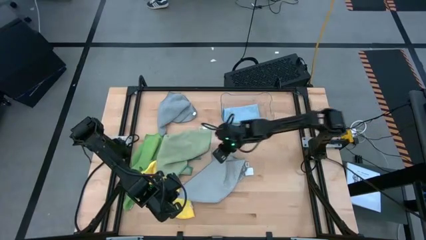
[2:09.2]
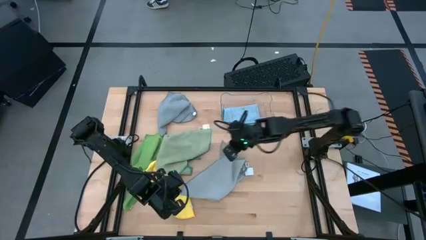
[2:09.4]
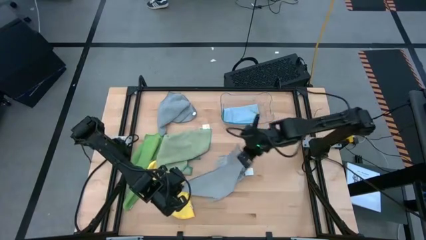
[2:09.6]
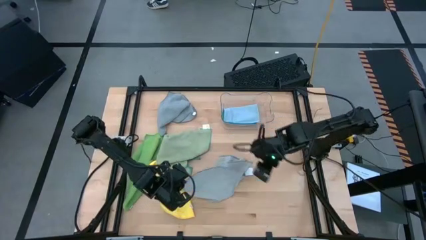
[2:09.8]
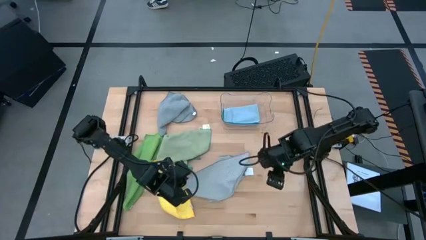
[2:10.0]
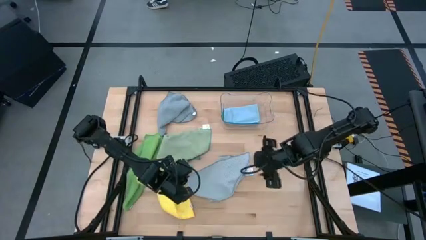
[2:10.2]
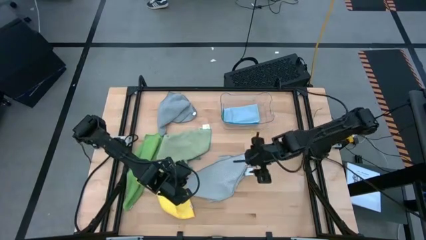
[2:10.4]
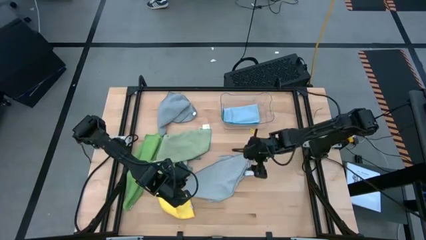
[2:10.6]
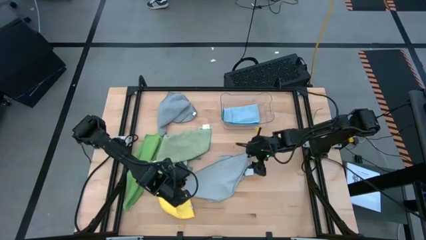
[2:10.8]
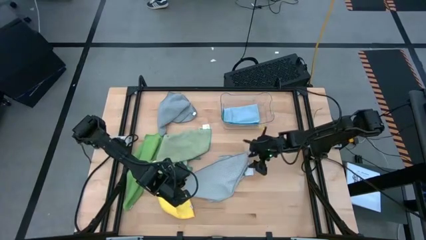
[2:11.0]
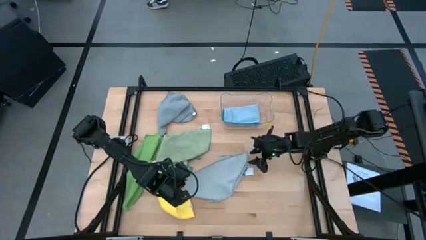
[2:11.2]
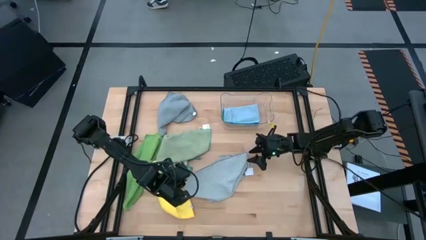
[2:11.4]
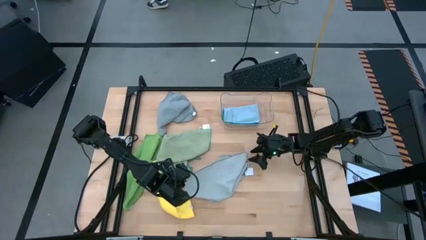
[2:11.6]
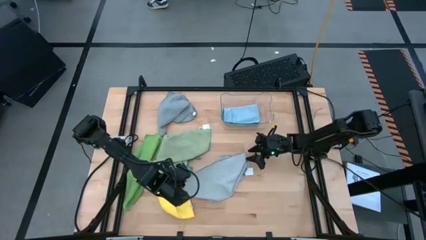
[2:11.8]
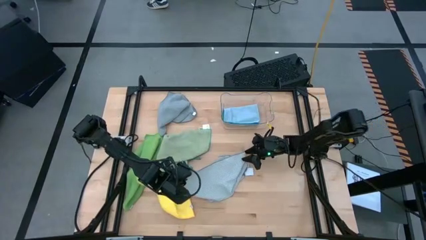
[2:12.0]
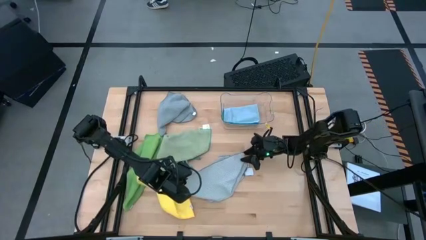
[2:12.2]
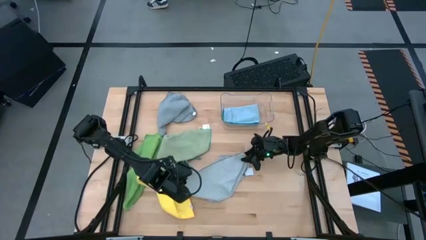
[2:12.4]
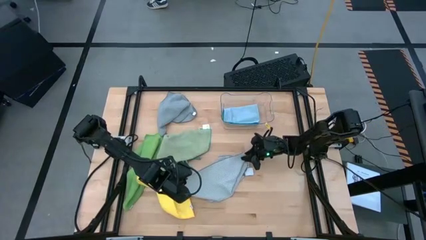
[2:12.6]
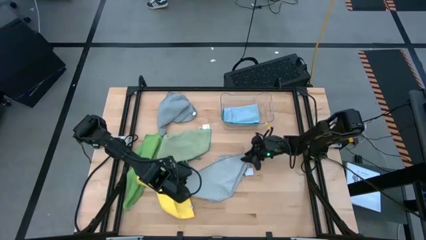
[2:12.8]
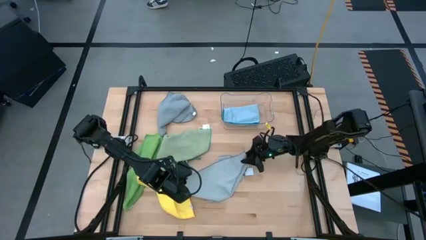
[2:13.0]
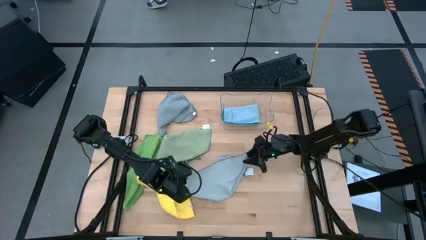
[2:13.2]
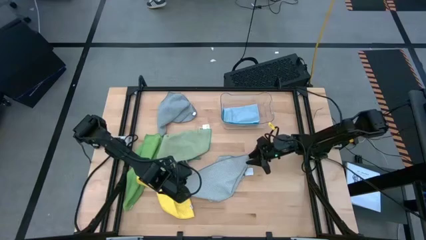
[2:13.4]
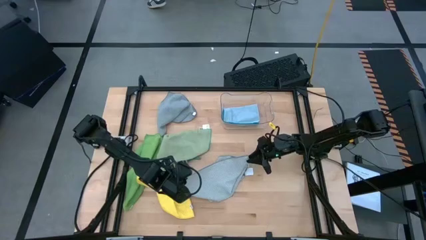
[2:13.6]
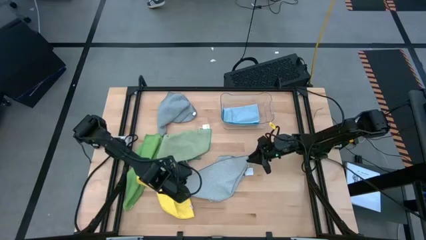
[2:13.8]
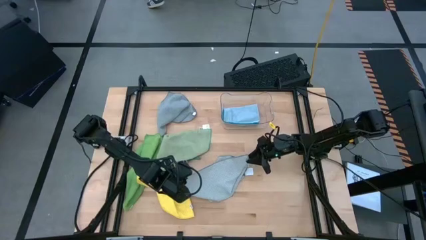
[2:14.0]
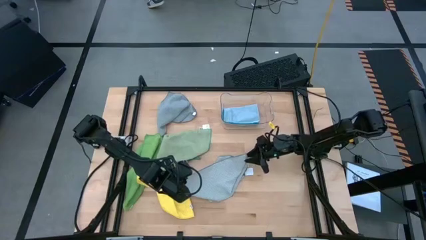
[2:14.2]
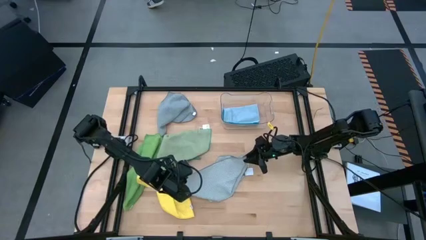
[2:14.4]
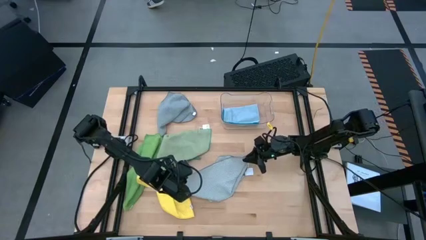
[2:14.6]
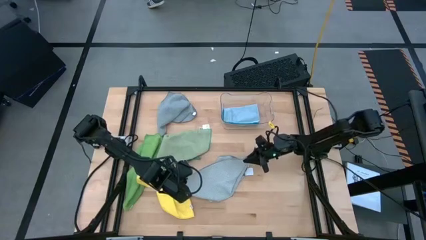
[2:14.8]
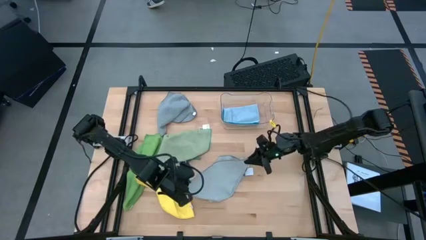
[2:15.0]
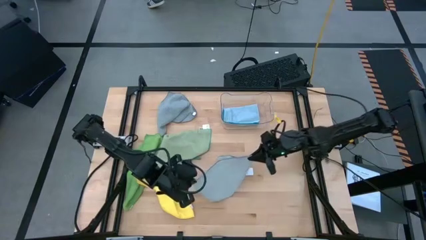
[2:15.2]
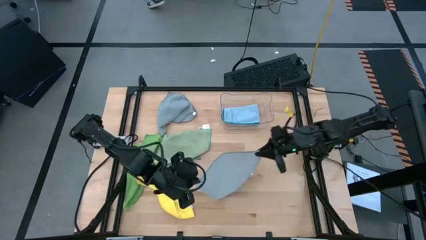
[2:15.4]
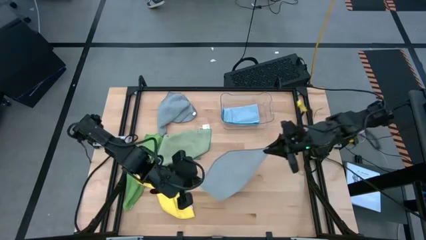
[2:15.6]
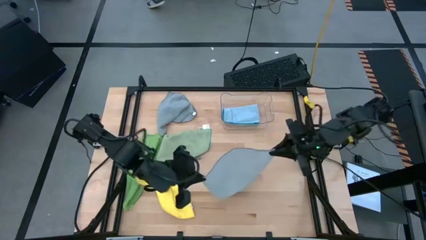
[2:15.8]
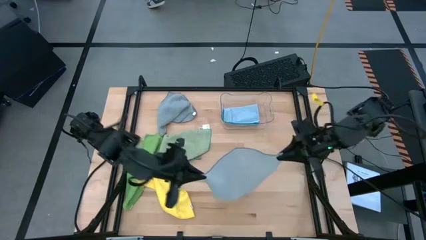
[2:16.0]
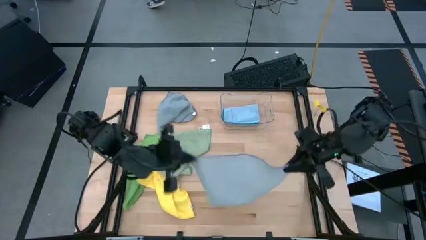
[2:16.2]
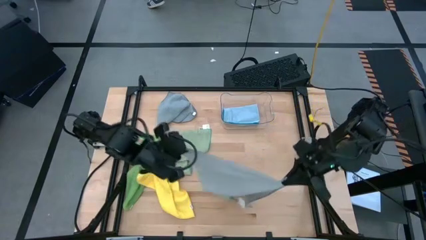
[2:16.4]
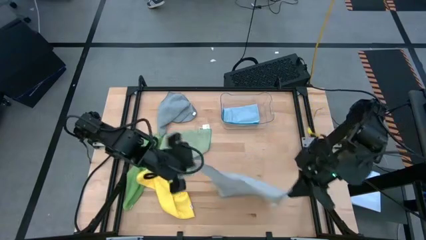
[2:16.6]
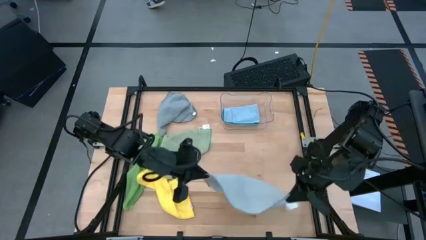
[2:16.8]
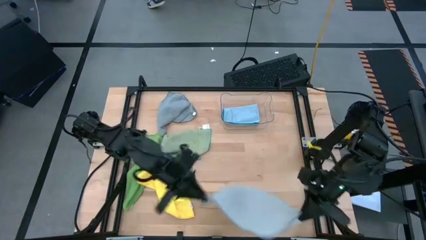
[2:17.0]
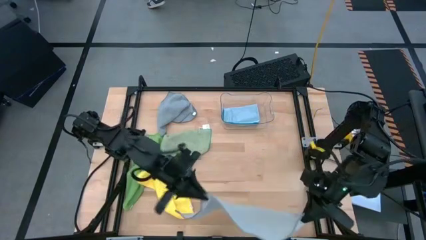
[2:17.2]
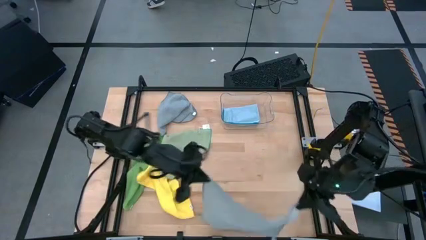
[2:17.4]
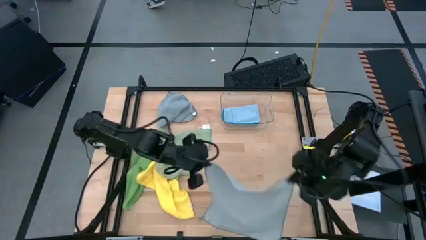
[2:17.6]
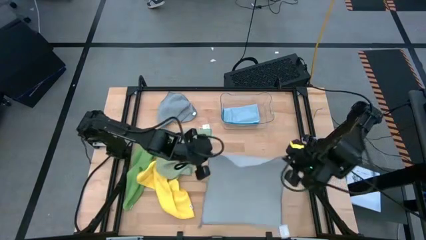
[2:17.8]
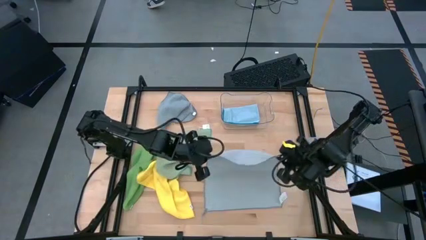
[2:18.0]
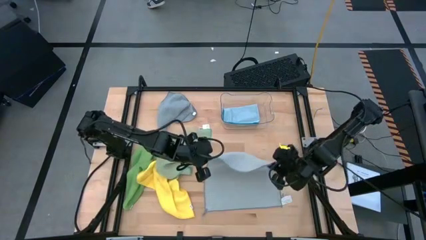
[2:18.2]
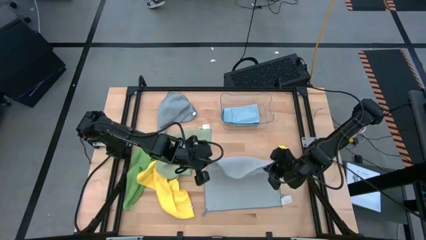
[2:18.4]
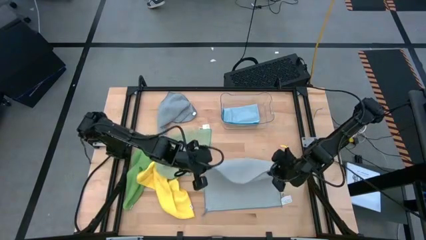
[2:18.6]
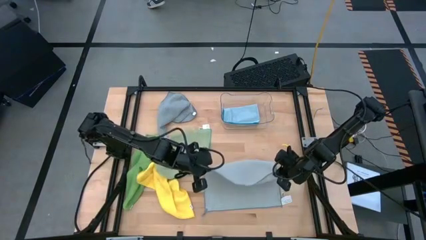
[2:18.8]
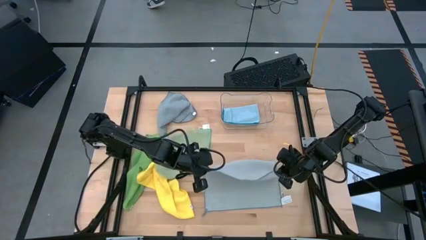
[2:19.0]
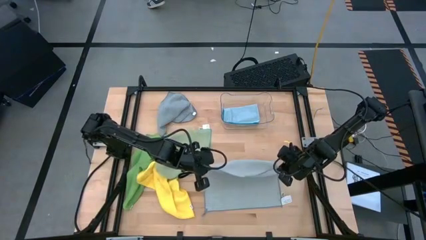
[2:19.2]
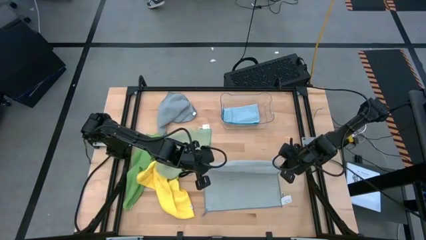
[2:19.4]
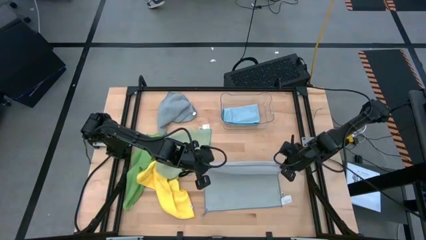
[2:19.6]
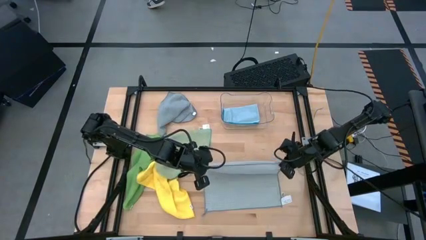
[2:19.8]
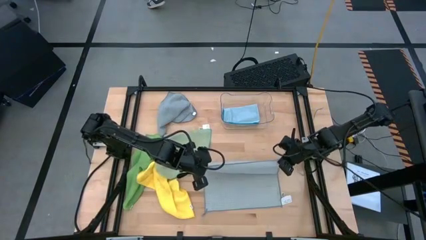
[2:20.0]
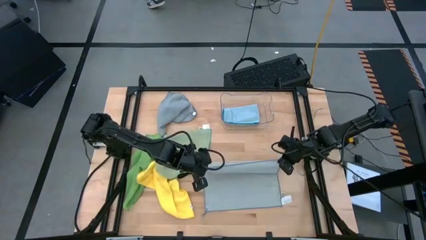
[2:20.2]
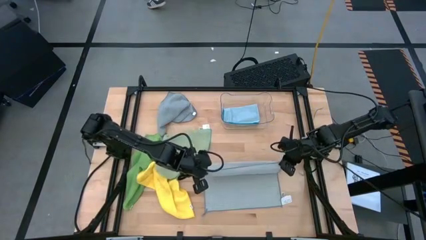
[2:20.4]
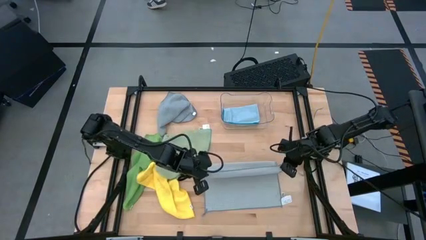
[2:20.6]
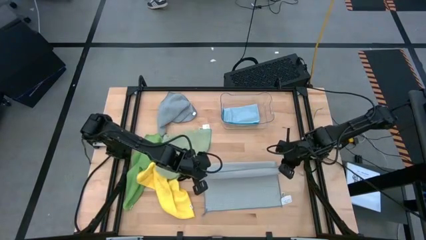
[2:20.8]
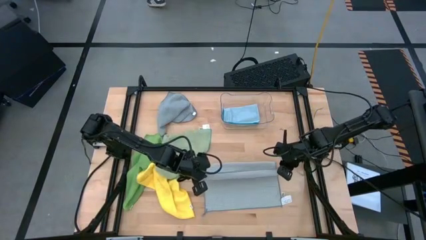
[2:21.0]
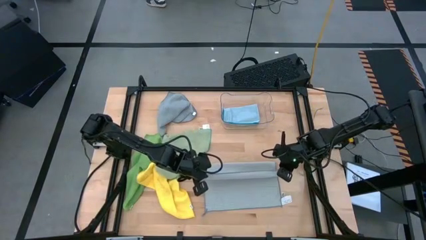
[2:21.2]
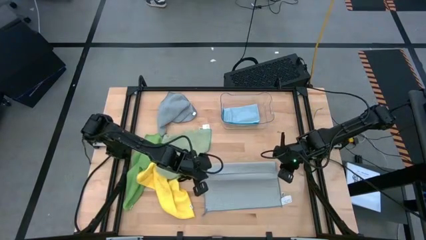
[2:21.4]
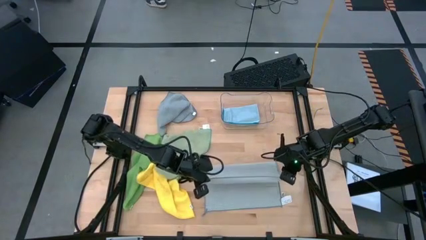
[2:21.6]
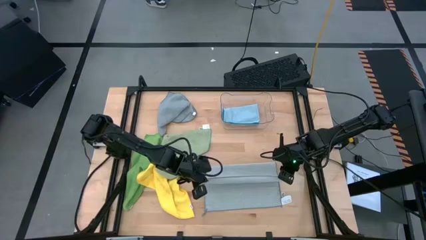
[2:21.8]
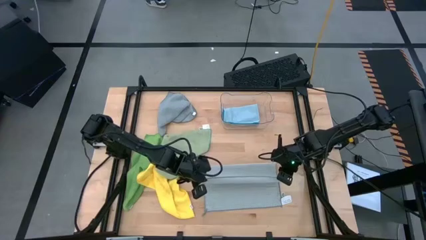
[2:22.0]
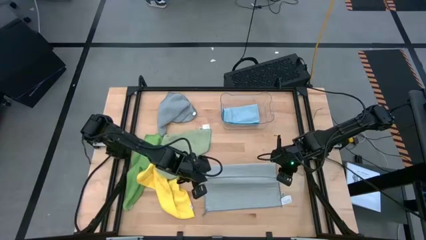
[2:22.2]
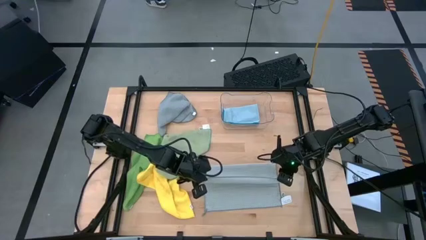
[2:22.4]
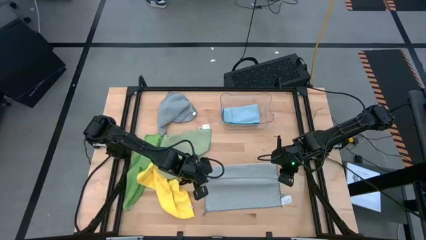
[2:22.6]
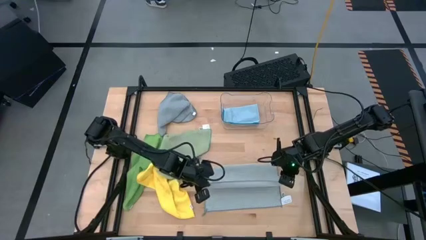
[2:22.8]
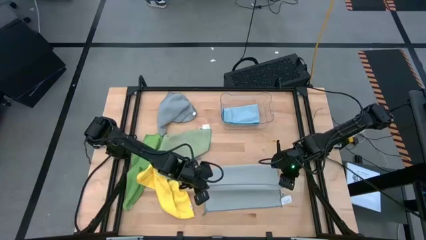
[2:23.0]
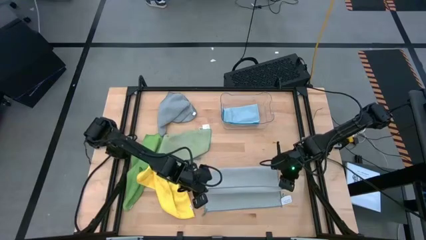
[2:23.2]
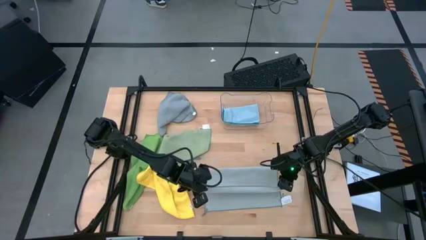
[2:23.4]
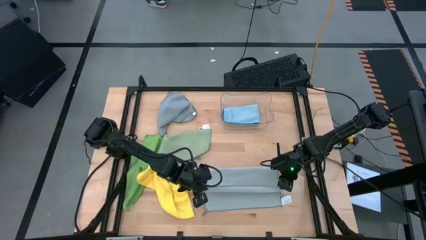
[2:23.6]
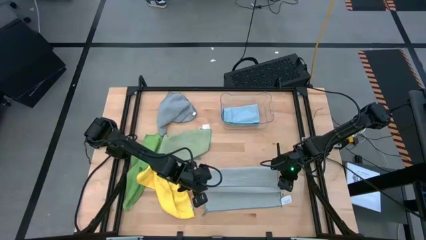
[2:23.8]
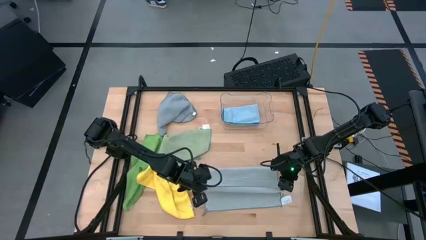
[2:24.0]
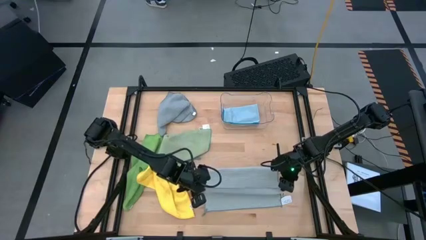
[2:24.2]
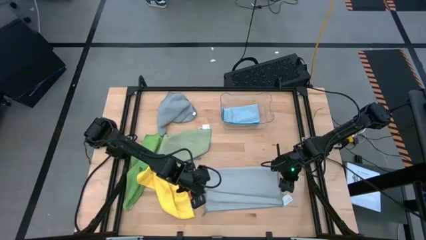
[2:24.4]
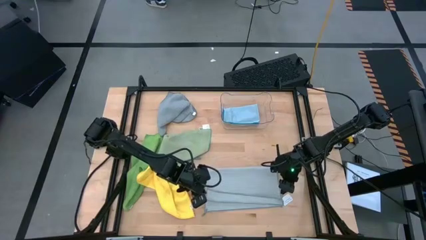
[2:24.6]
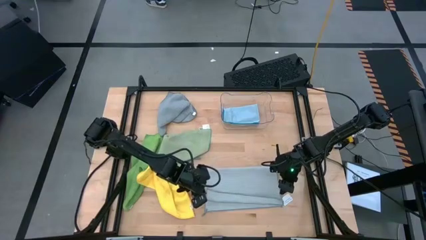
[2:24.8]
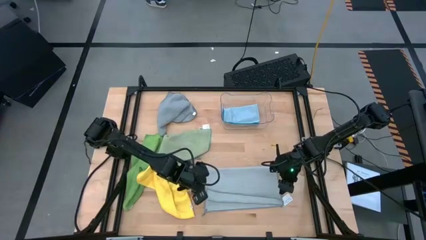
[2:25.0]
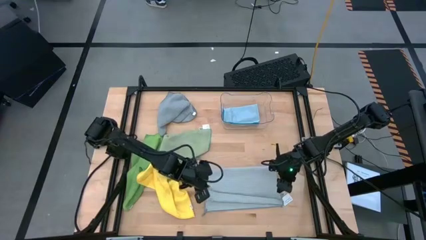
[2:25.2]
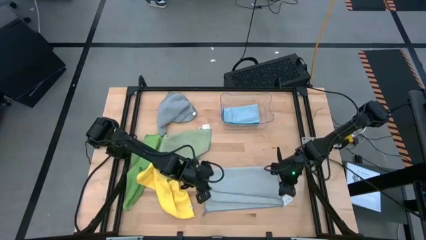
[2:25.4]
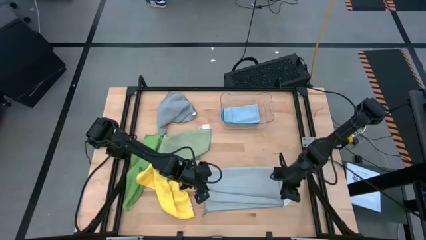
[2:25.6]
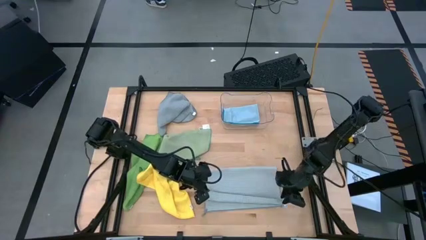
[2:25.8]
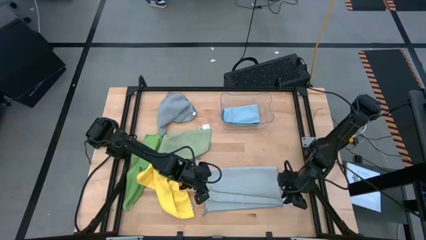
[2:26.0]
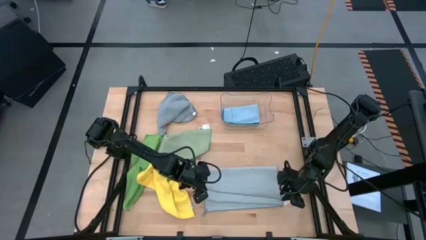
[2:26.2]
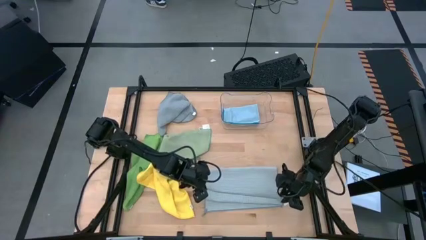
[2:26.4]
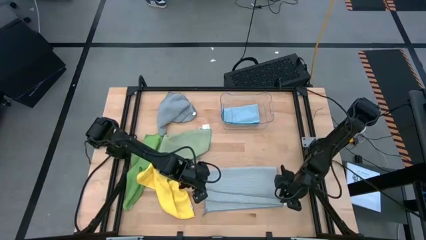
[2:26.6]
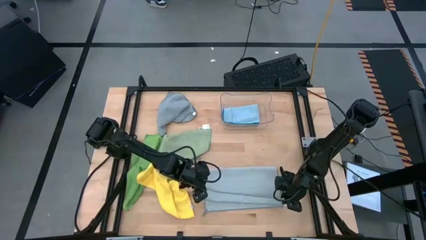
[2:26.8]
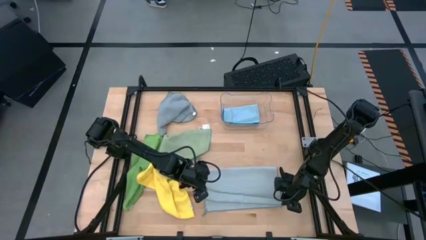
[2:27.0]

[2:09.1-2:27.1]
Task: Fold microfiber towels
Fold the light gray towel
